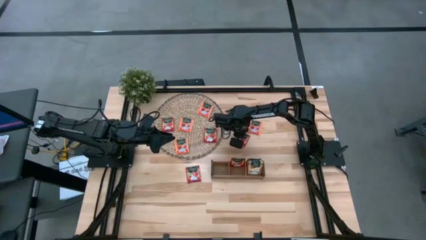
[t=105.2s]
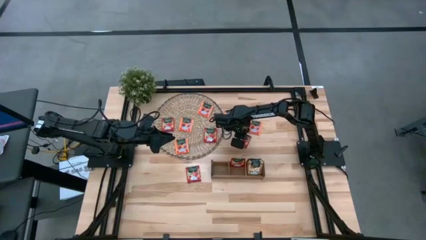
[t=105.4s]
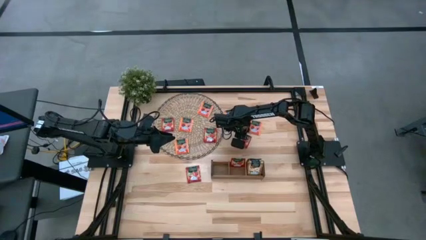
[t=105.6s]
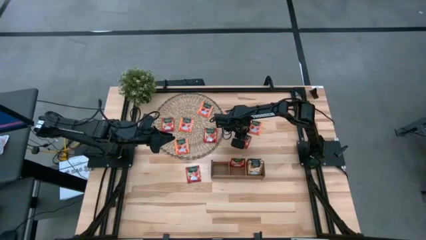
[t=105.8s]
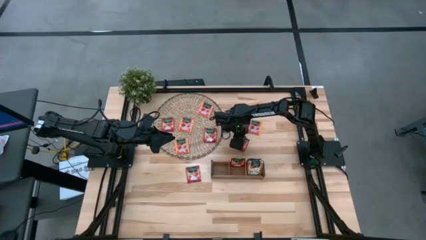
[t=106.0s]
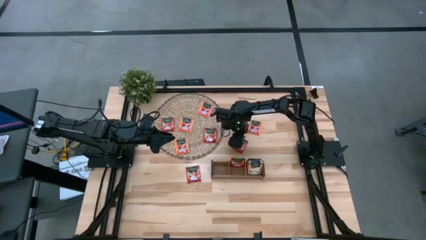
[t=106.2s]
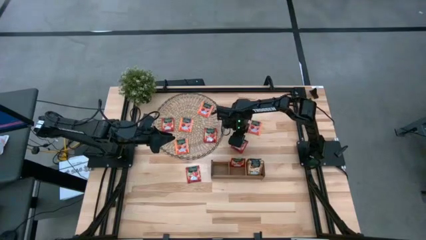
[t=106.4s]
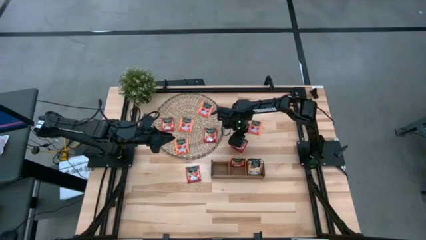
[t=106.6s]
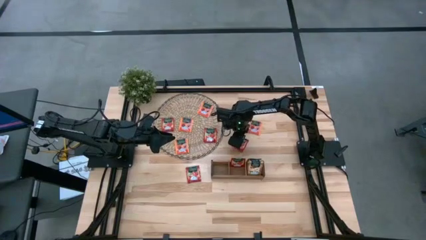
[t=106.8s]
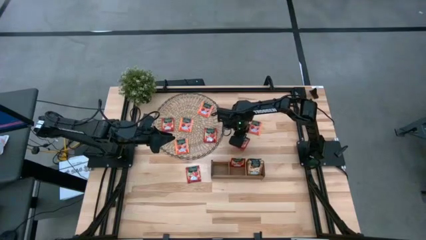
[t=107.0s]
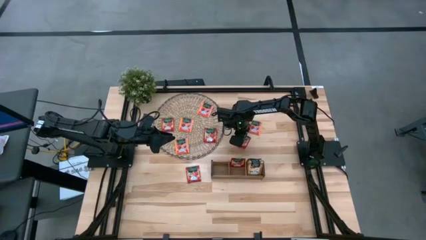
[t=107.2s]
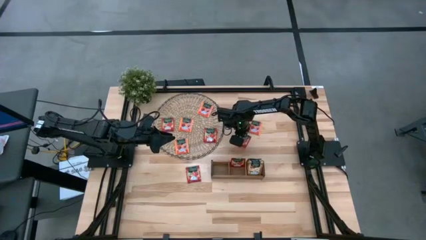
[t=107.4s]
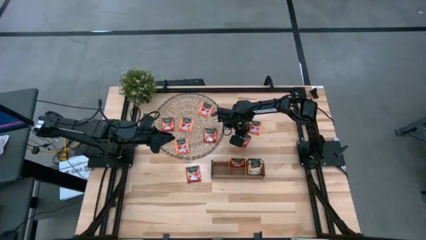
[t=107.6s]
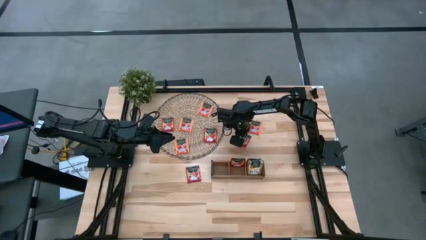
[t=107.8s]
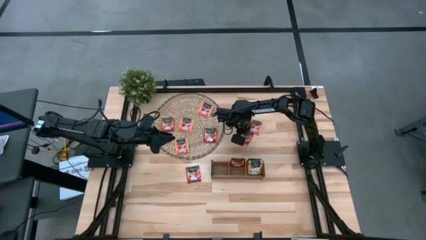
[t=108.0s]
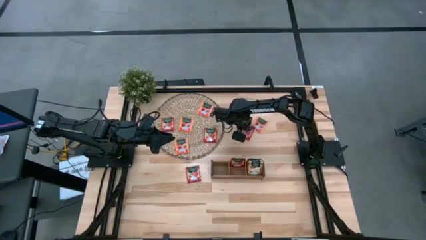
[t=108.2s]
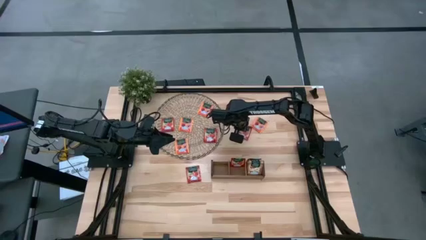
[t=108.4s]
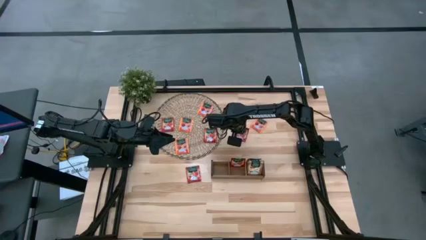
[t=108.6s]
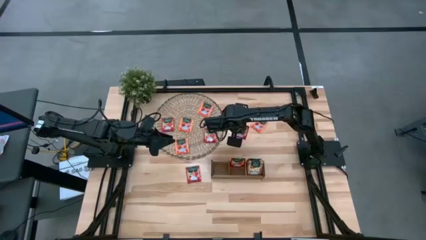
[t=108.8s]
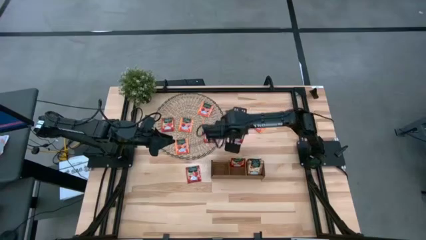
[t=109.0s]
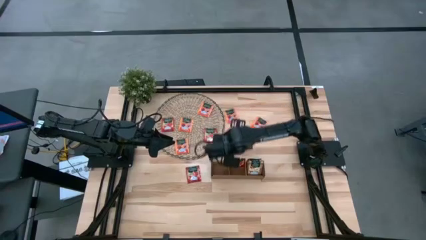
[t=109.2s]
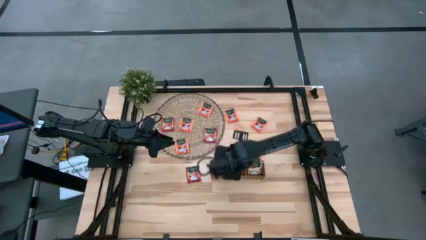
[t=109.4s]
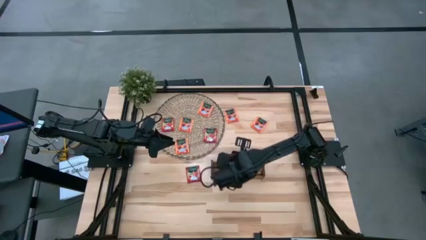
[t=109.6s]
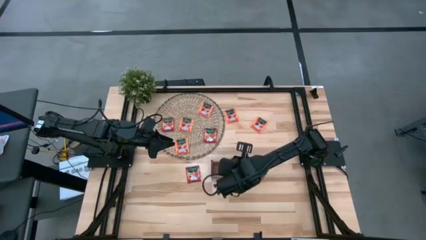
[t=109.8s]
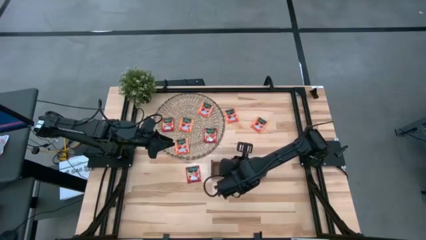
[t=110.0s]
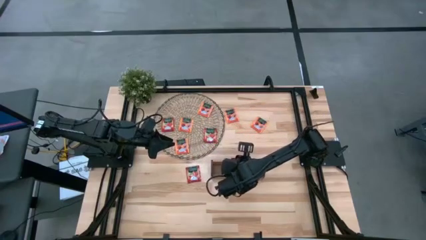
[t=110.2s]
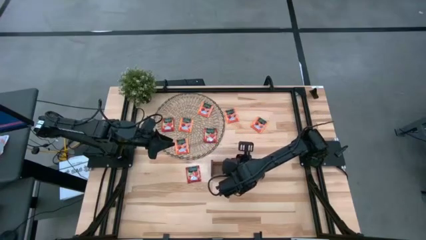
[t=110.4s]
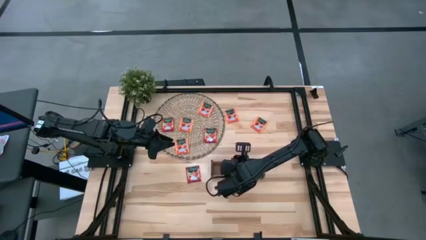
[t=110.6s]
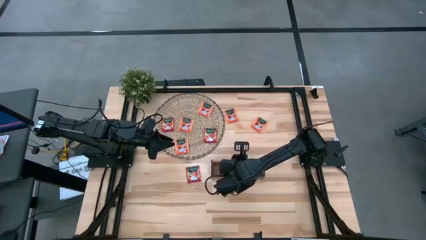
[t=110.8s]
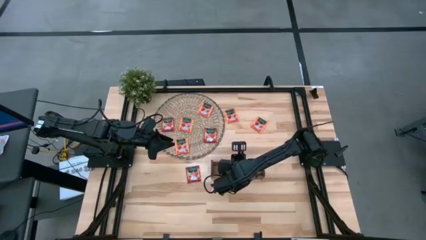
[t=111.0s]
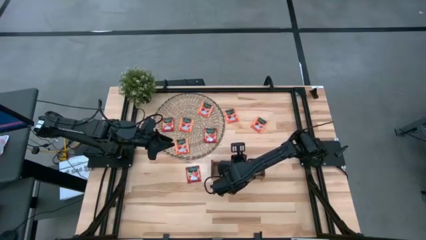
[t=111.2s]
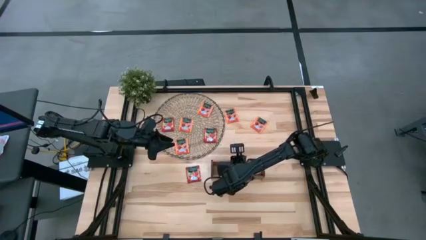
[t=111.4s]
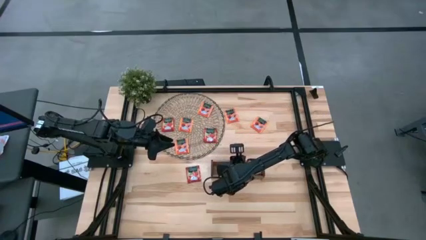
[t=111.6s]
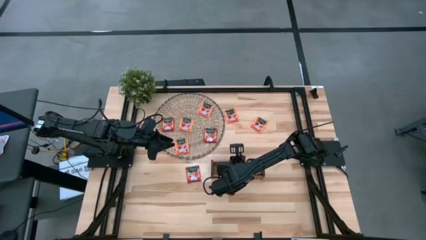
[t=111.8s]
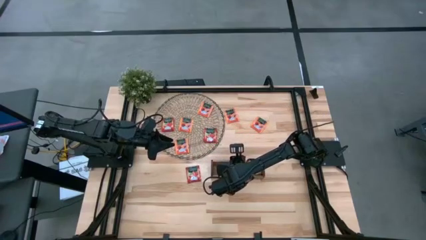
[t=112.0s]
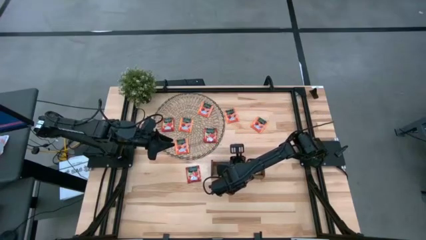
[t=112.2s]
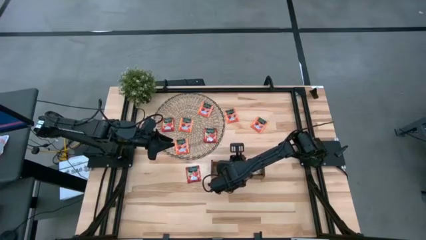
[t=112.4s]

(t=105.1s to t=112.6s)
Task: Pick & Place Tea
Put the red tea bag into the middle slot of the wooden organizer

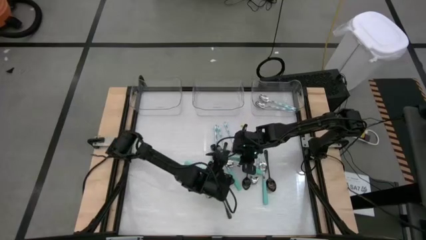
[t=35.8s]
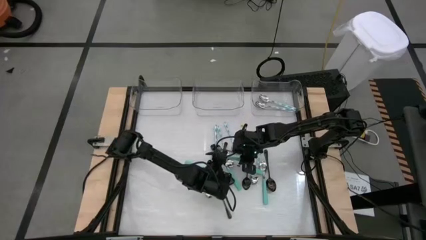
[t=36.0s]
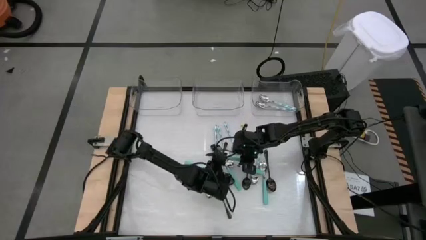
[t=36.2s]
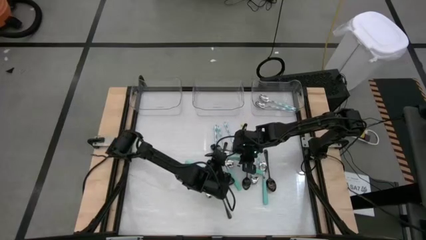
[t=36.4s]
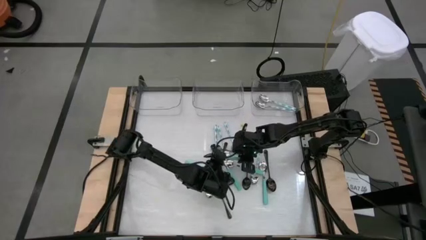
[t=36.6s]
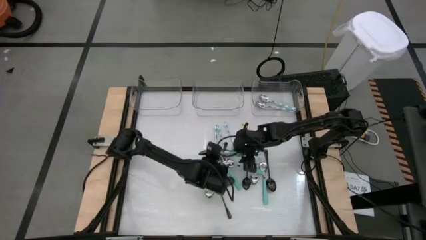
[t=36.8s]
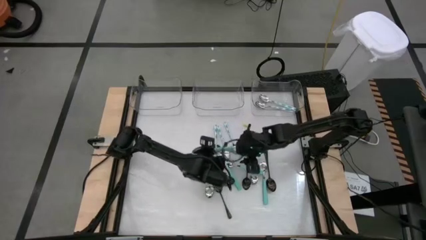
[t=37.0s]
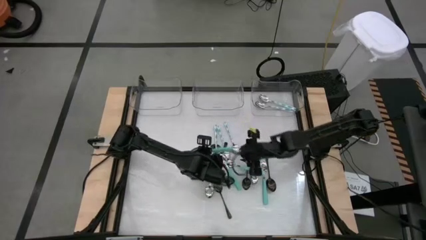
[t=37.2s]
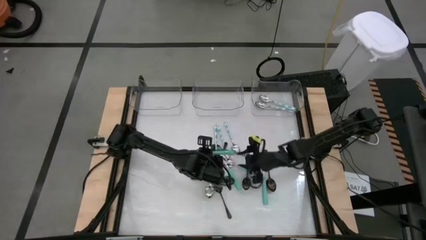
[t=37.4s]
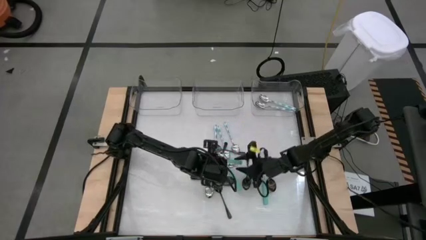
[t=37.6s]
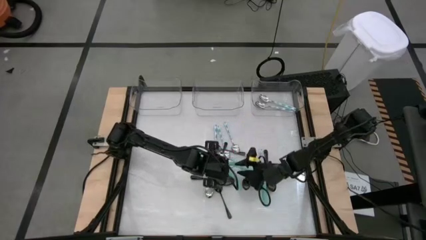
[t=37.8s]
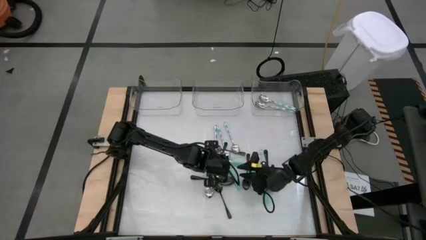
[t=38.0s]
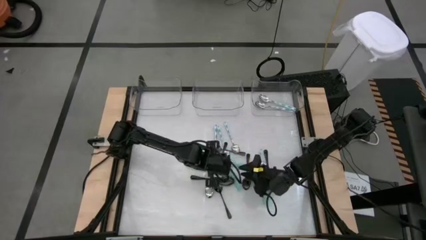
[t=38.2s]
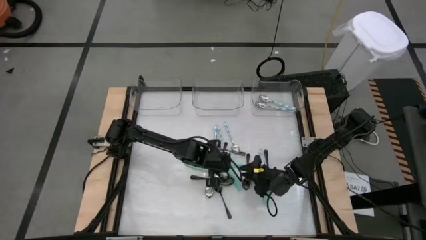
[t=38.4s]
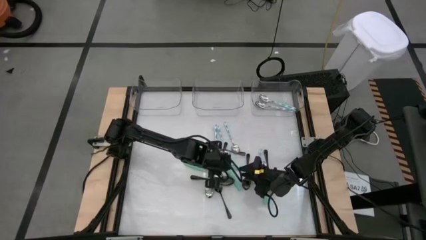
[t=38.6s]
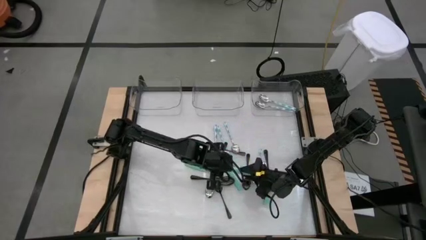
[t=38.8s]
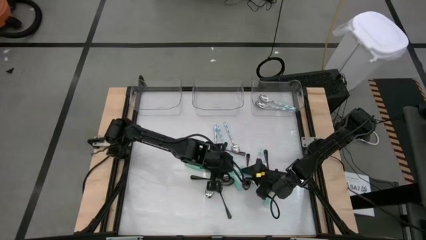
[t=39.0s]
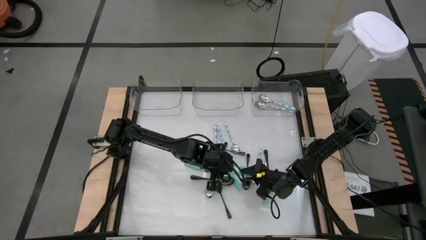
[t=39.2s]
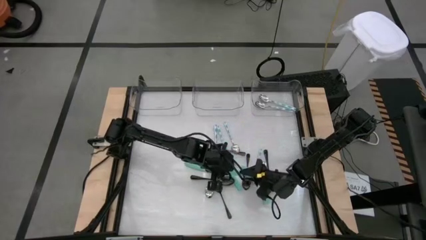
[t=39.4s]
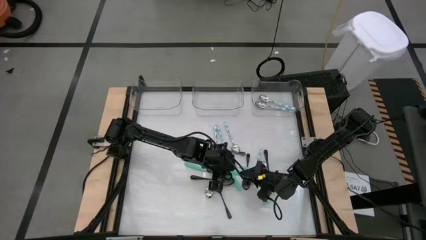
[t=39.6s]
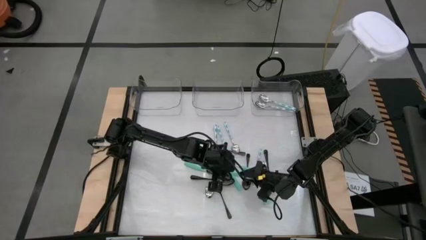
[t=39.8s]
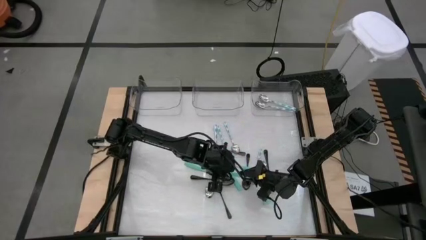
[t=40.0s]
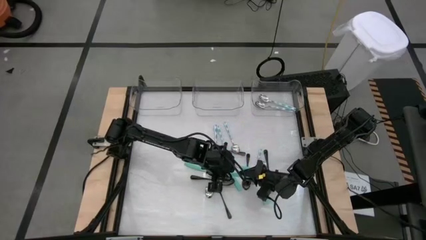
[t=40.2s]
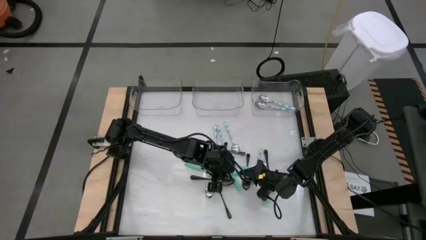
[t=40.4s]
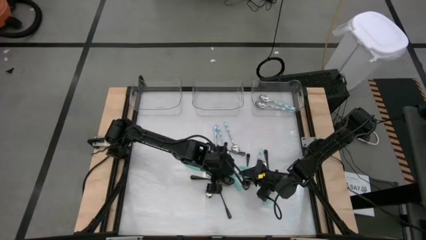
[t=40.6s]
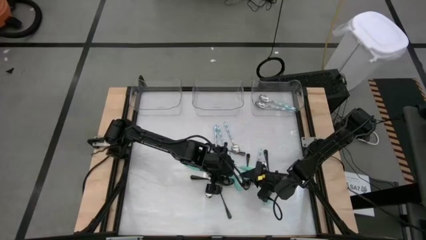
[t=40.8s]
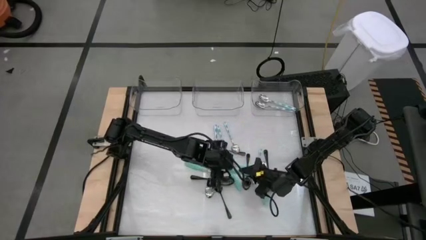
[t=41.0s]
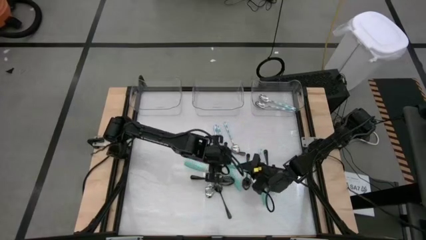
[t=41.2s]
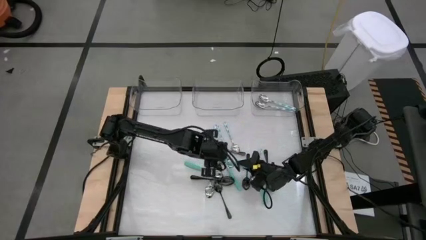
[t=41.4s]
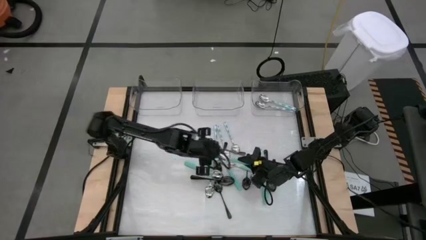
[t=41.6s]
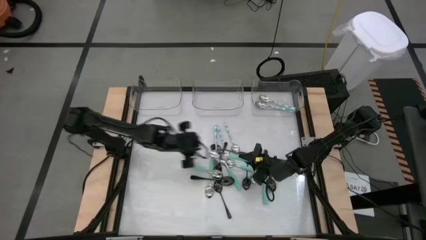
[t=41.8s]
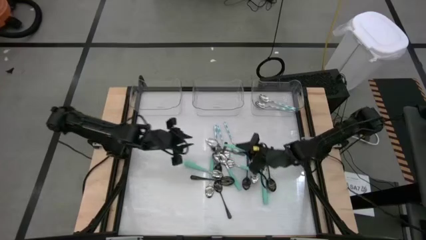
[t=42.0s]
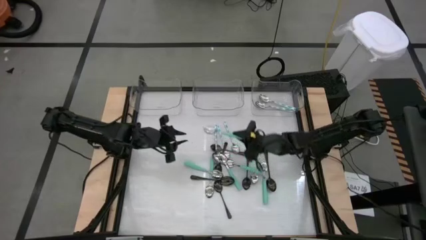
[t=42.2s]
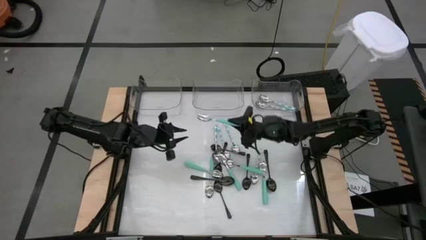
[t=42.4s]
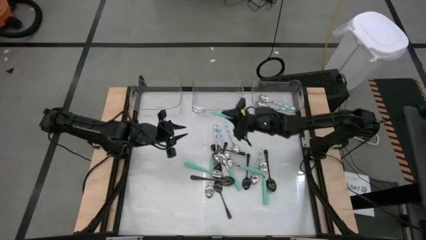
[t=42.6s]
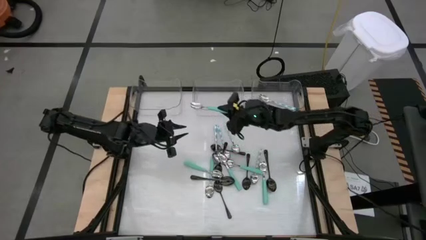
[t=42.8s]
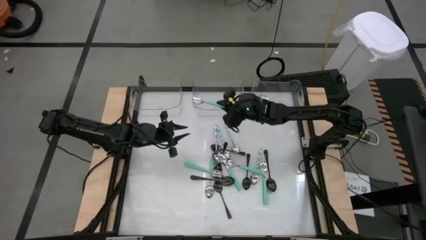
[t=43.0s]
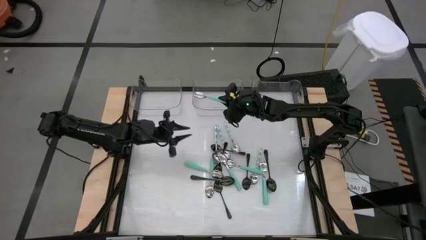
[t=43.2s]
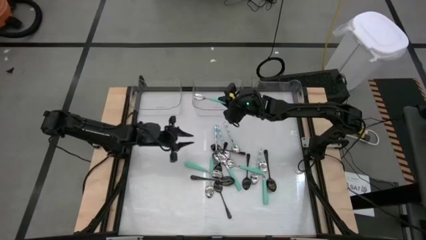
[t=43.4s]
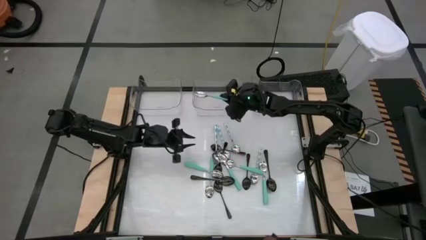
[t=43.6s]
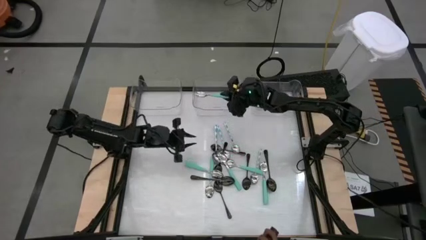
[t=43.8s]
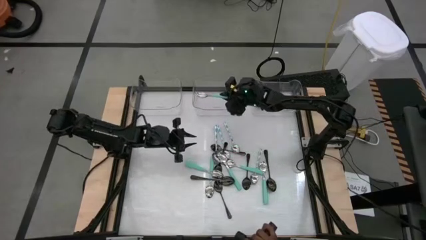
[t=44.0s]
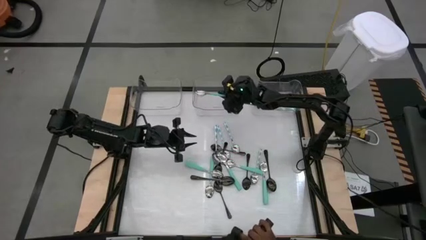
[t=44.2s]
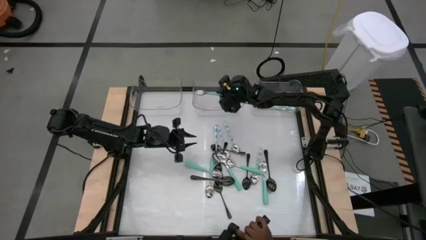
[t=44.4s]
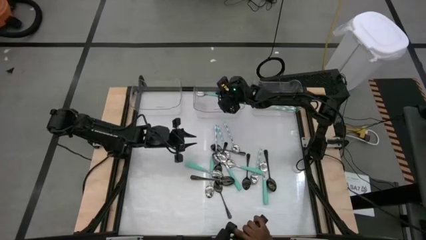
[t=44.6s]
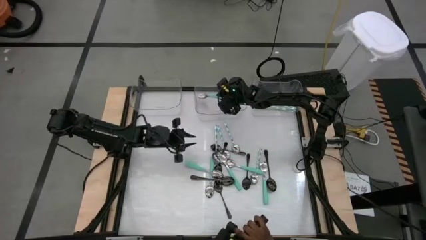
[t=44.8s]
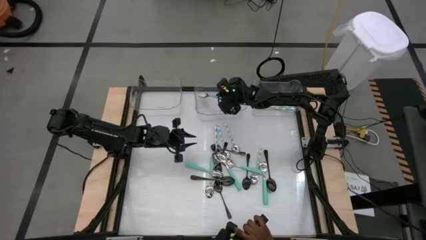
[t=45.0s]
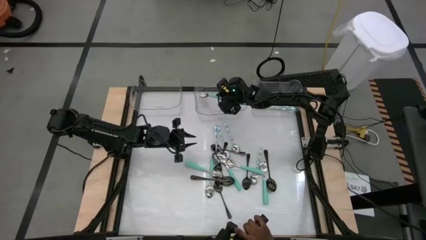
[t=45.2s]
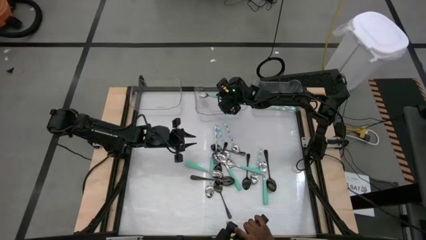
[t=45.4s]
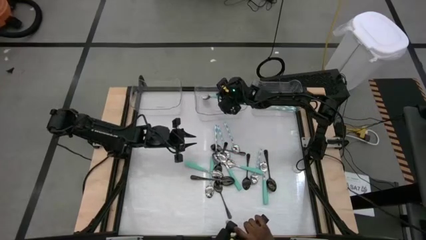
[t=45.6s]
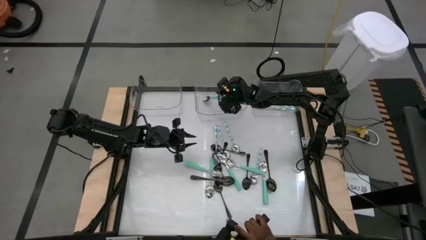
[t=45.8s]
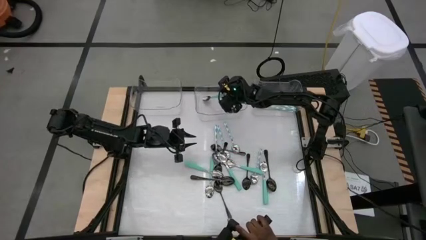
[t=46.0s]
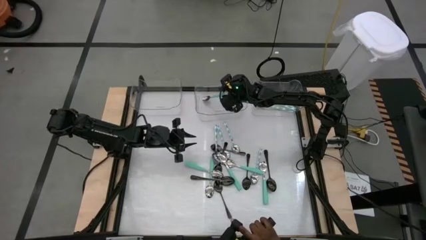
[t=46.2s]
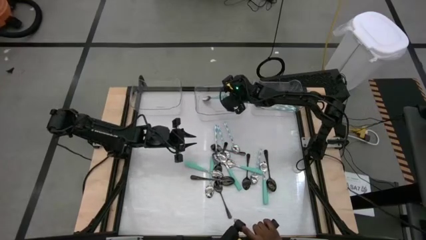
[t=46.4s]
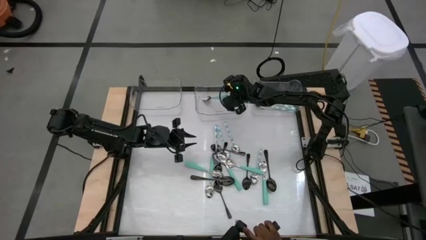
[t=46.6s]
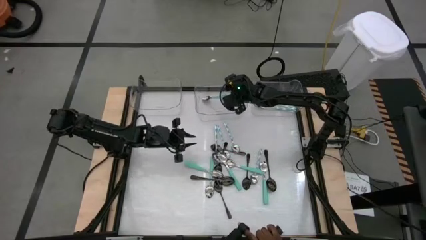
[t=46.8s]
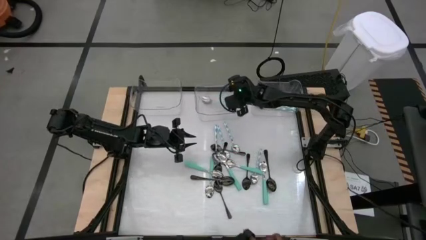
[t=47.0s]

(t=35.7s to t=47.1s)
Task: Sort silverware by color (type)
Put the green spoon into the center transparent bin
